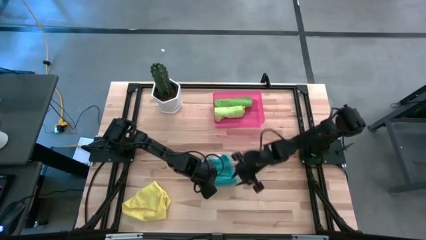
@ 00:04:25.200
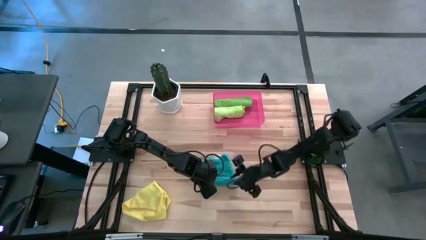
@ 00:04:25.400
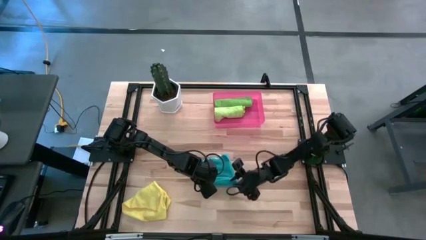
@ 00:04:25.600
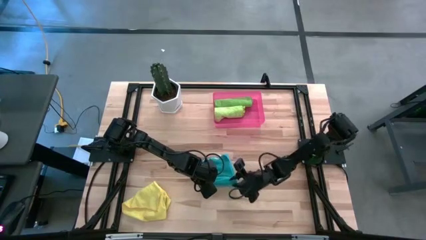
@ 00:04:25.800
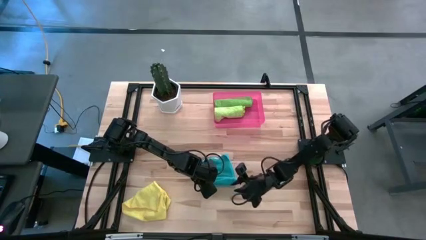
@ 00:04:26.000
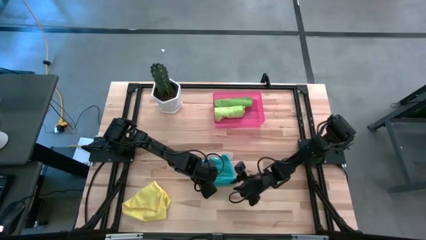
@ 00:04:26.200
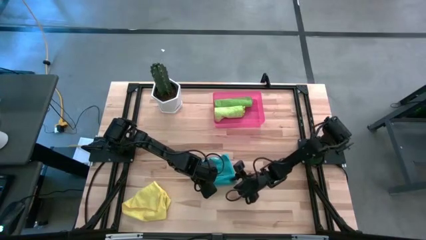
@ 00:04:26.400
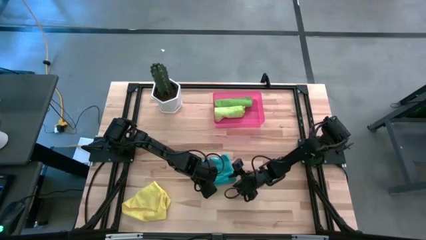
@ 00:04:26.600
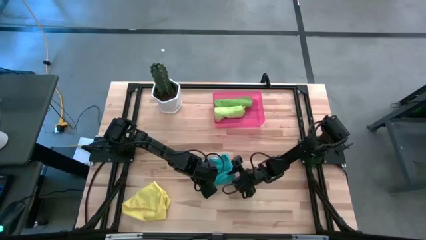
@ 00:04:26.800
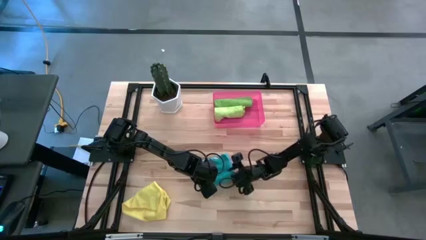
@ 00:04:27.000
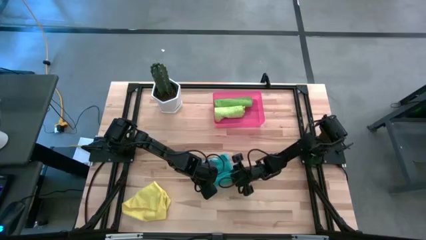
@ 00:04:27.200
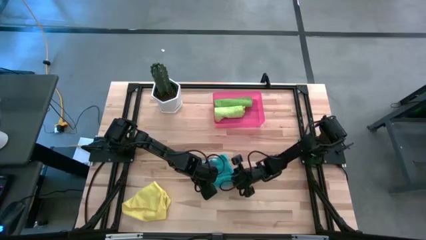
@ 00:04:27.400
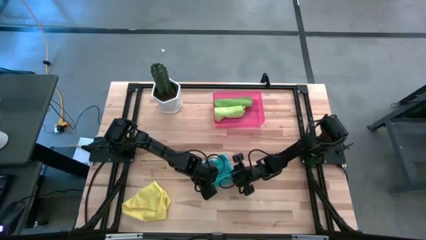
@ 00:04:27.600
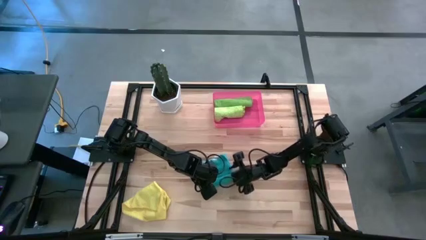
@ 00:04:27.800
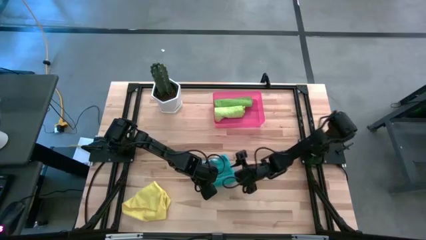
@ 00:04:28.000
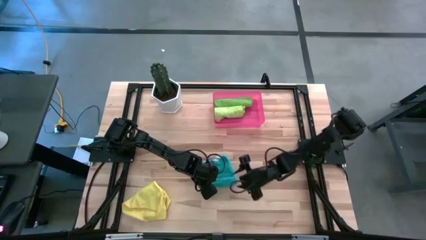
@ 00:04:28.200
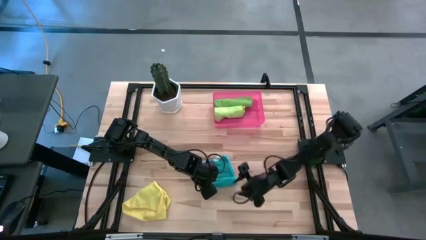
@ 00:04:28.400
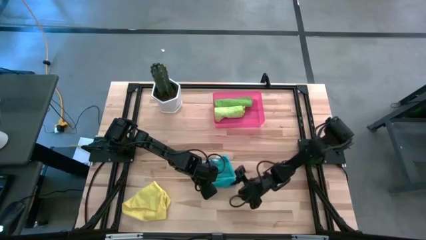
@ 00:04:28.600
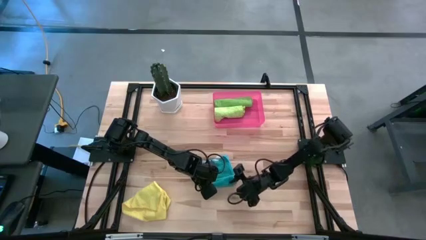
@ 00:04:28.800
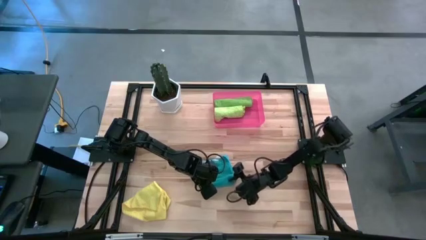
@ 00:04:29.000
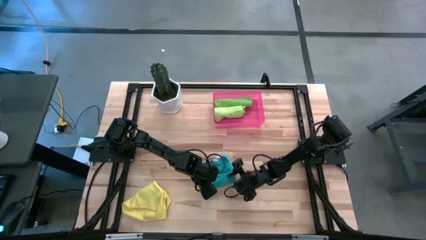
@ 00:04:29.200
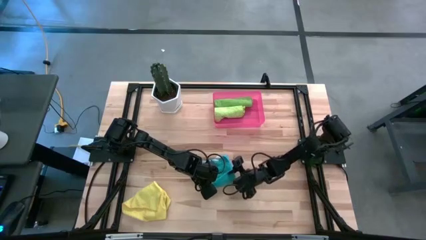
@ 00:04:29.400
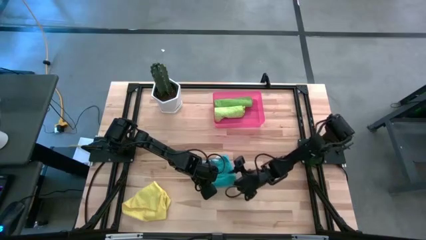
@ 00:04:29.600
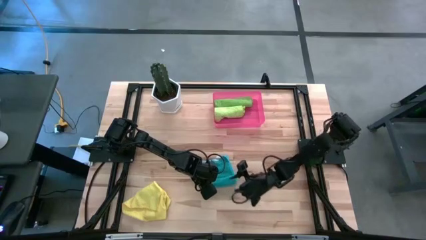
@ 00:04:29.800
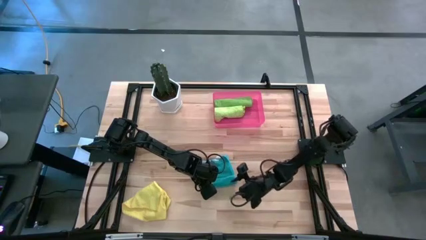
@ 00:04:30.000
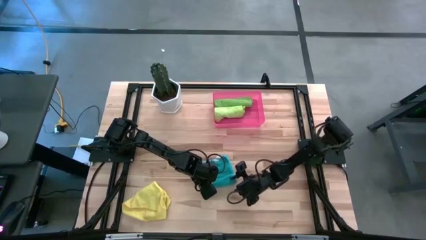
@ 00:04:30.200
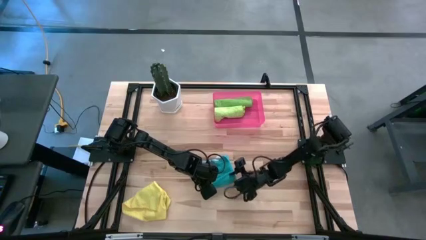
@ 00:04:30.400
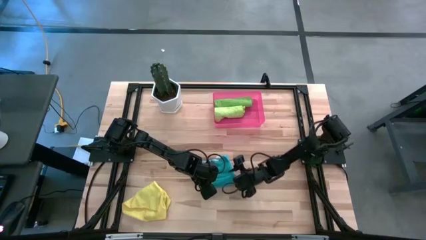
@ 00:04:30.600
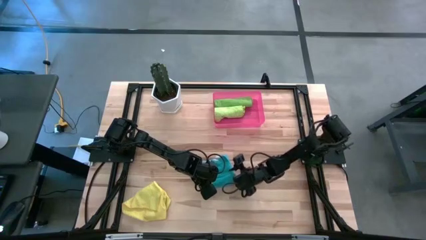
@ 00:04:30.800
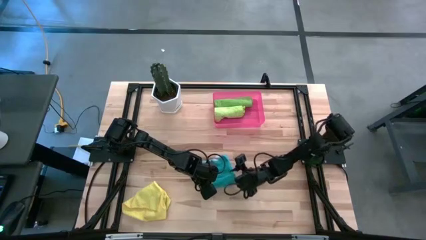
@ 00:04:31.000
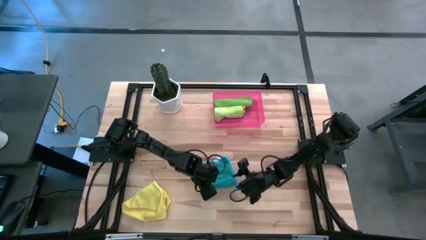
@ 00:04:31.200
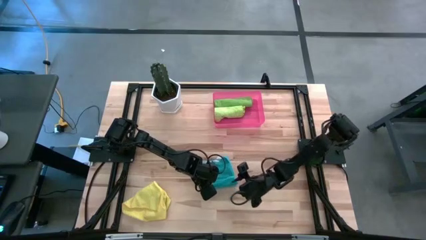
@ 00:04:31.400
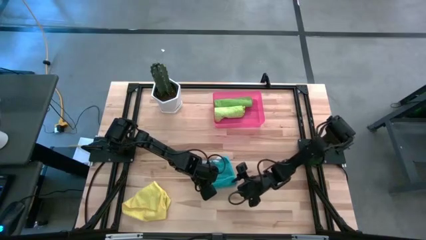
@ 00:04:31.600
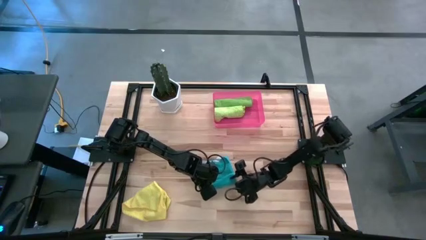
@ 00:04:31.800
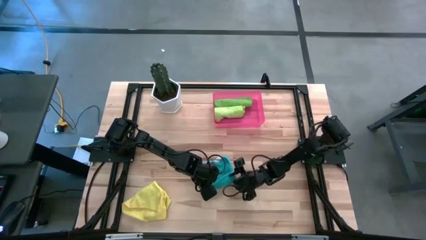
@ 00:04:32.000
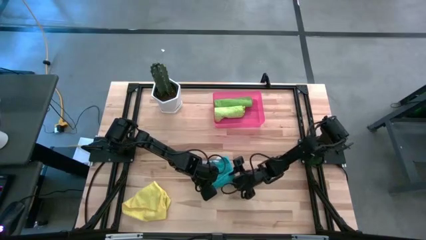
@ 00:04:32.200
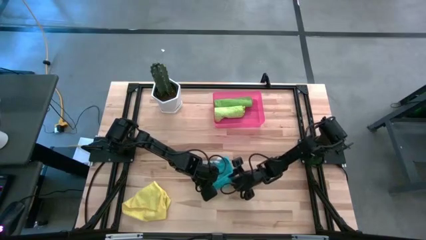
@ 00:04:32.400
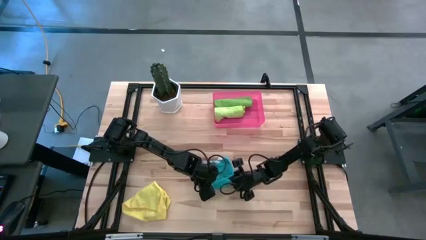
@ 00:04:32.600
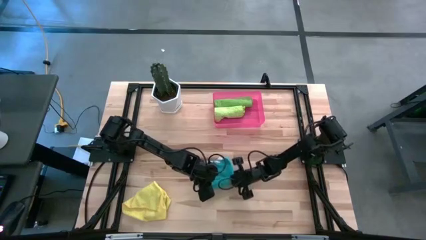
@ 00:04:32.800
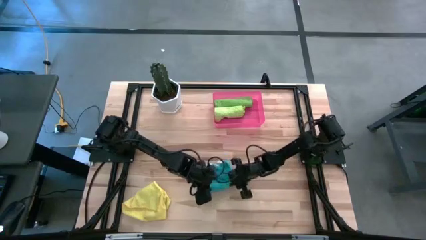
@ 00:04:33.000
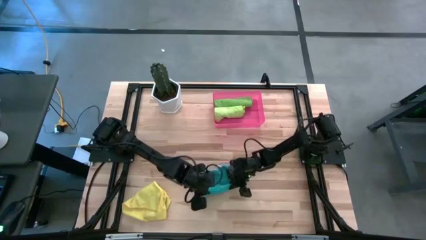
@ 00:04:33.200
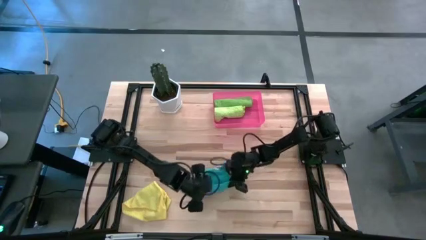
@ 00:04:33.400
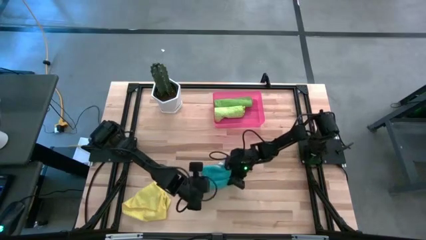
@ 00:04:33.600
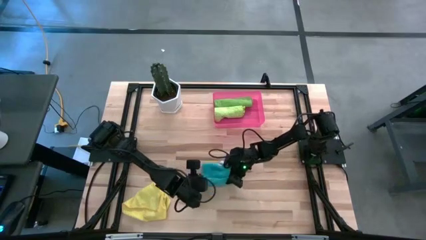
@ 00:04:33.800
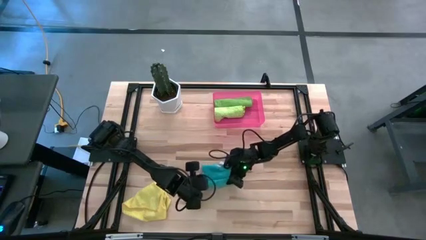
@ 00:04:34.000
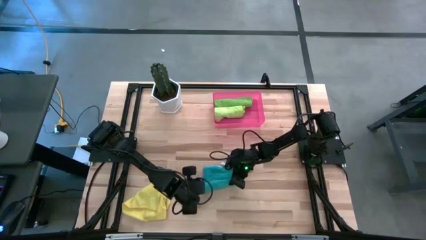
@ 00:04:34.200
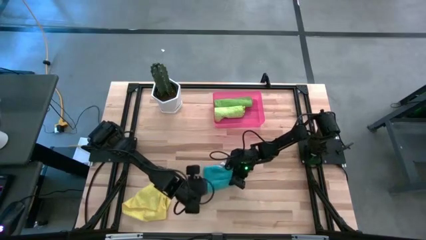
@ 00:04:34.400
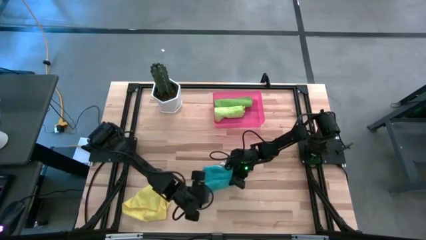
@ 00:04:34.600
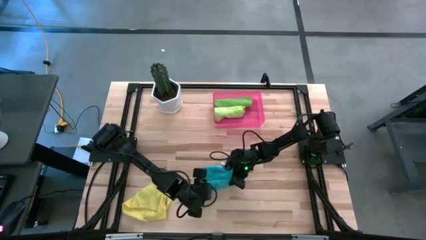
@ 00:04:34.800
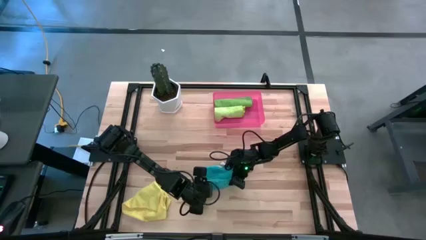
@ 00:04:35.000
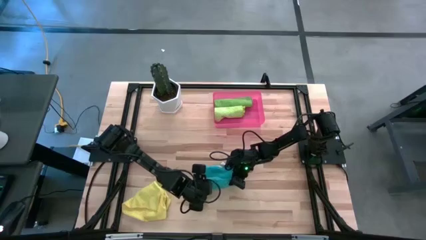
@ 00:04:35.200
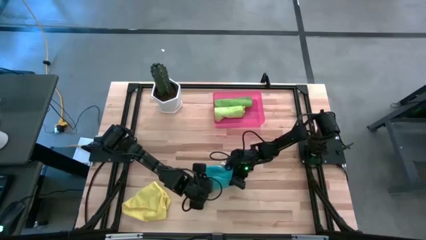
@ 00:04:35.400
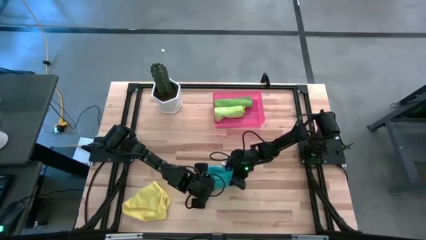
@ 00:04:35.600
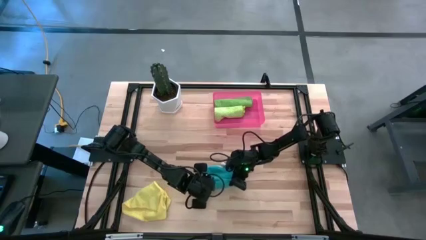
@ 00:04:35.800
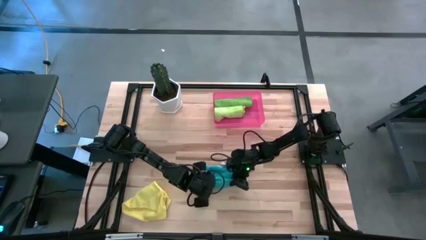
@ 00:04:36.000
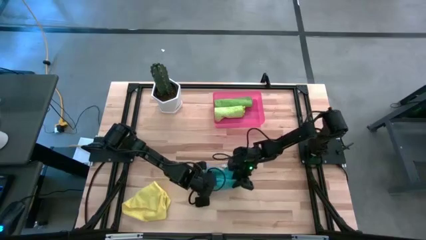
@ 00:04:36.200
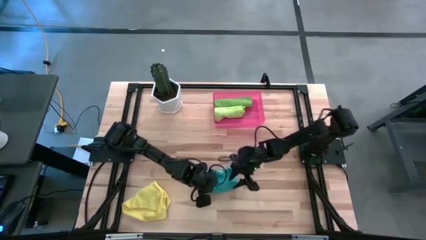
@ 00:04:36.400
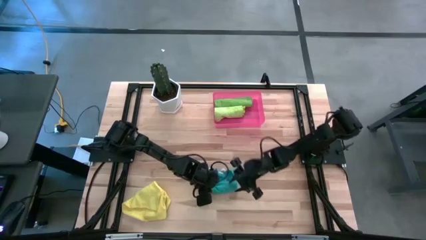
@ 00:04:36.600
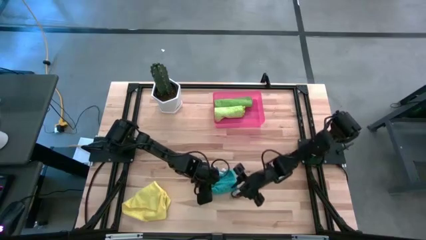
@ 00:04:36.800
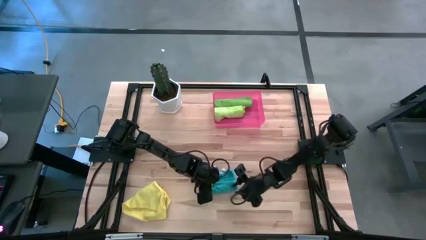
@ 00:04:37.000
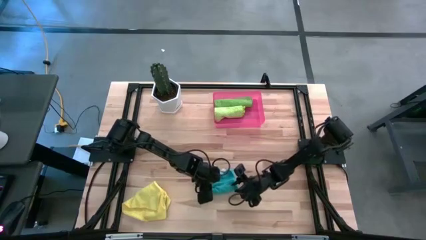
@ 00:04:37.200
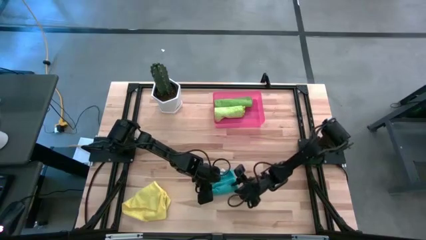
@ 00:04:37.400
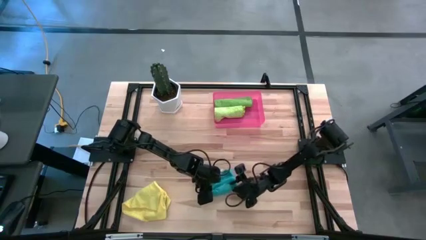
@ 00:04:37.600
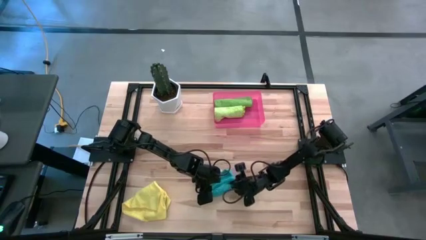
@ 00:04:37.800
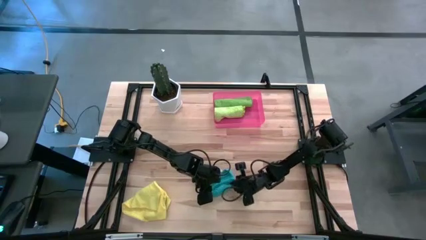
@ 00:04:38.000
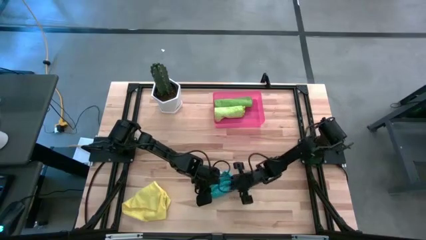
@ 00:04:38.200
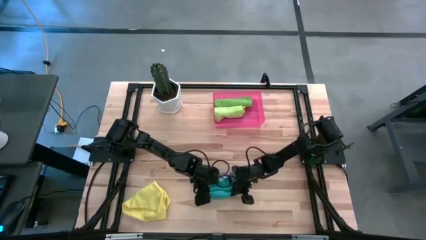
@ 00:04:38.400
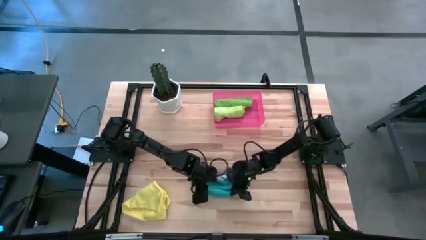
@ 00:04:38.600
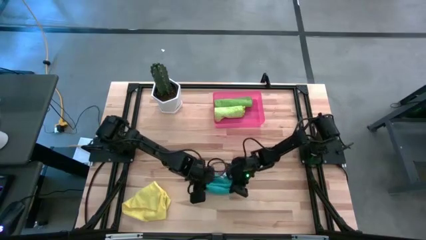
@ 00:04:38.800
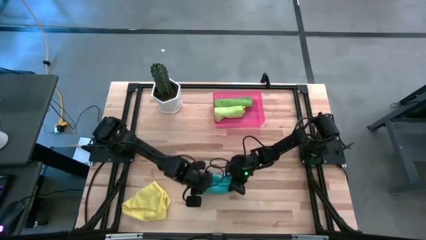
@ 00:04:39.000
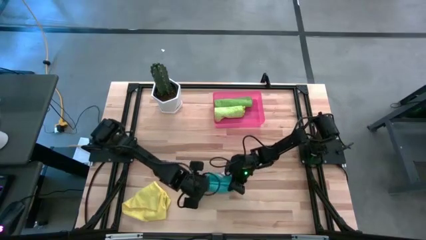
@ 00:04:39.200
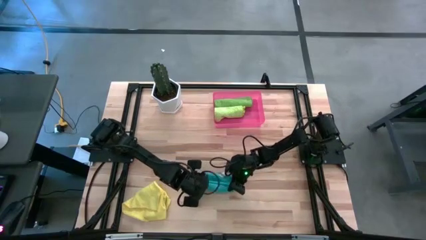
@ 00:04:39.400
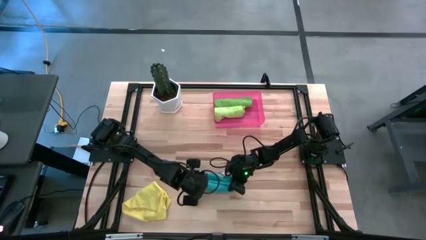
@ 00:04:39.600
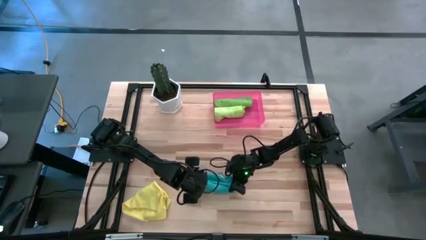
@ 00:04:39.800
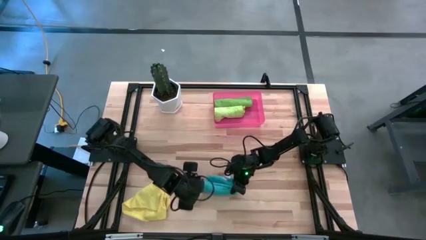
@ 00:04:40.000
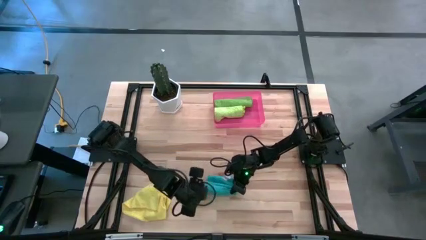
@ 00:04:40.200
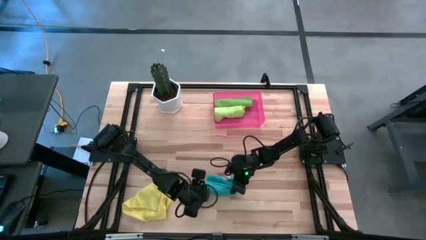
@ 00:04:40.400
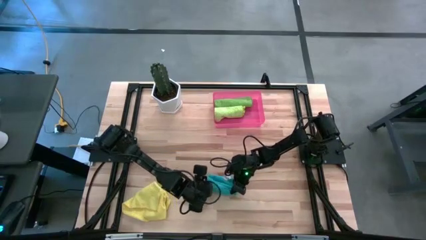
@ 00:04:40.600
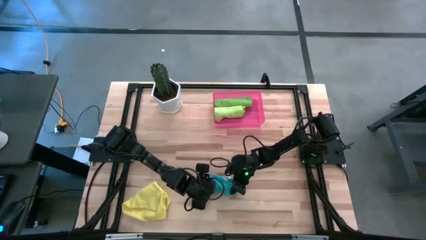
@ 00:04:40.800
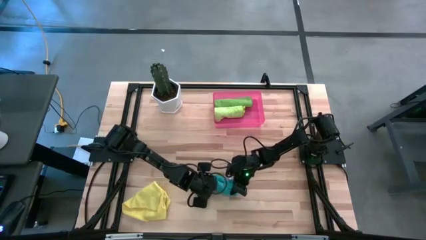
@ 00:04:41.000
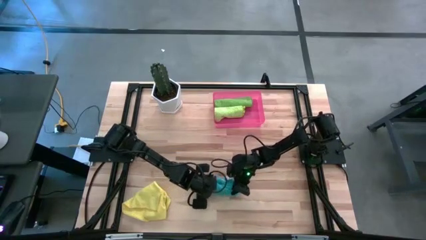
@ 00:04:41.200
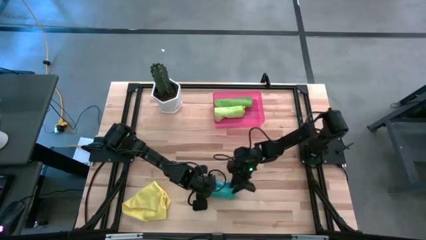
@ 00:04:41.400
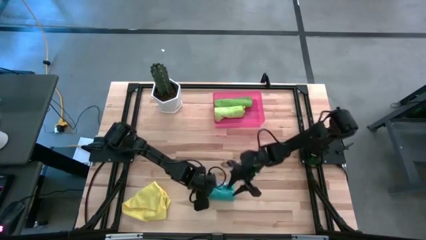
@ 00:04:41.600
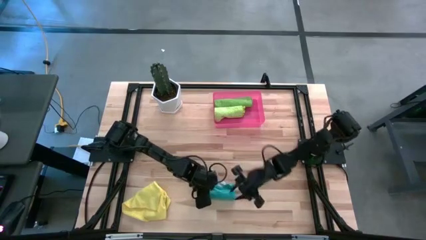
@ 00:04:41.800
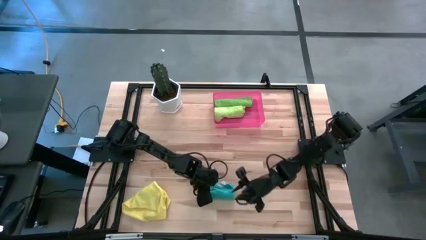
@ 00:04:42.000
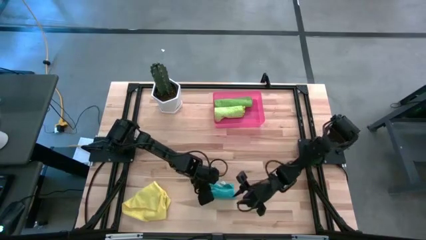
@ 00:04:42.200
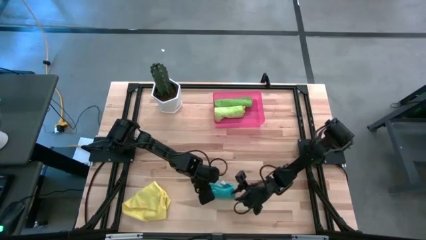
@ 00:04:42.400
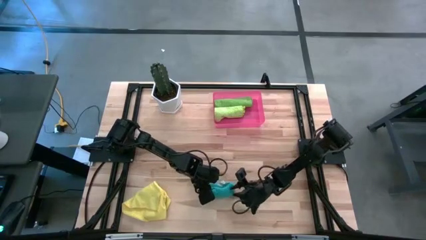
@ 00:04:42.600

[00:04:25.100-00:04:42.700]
Task: Roll microfiber towels into tight, uniform cylinder then place into a basket
Roll the blue microfiber cloth
